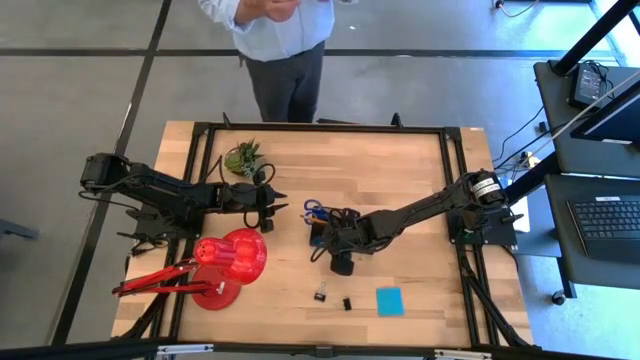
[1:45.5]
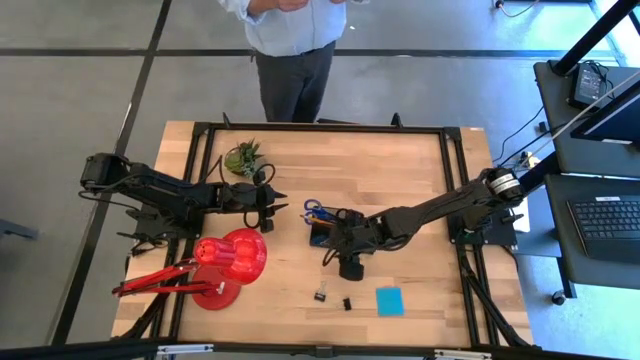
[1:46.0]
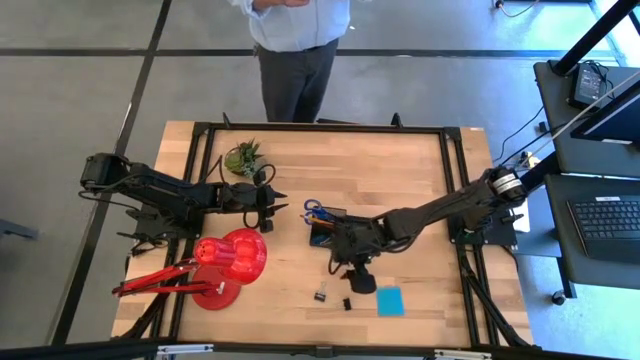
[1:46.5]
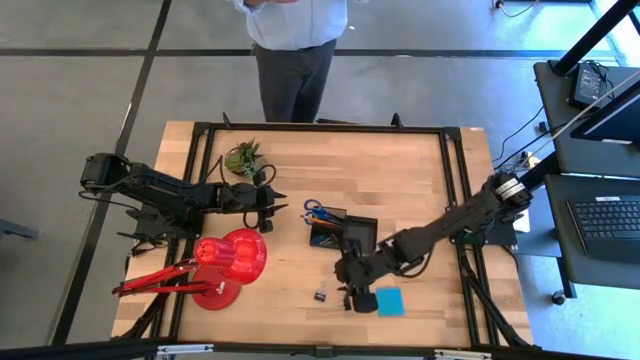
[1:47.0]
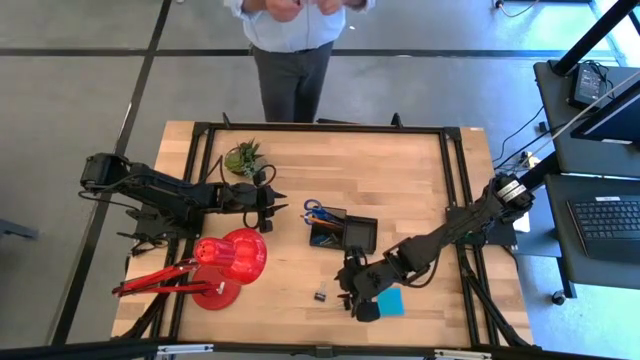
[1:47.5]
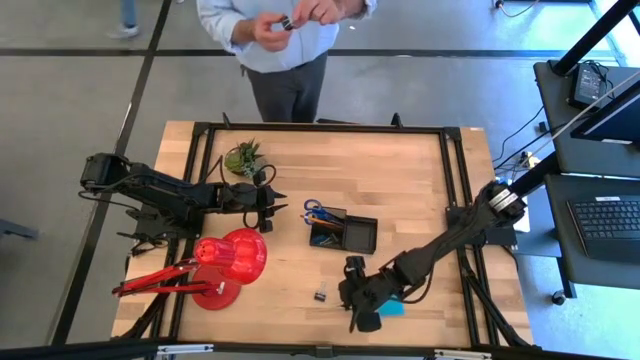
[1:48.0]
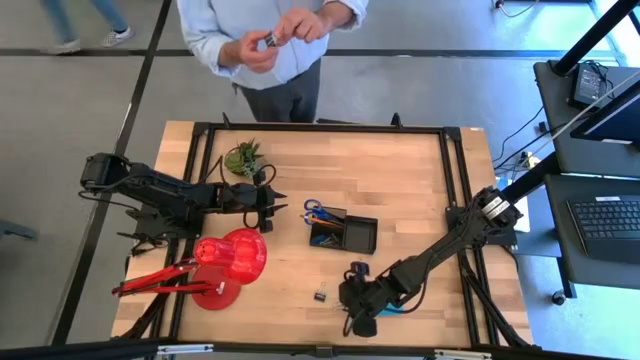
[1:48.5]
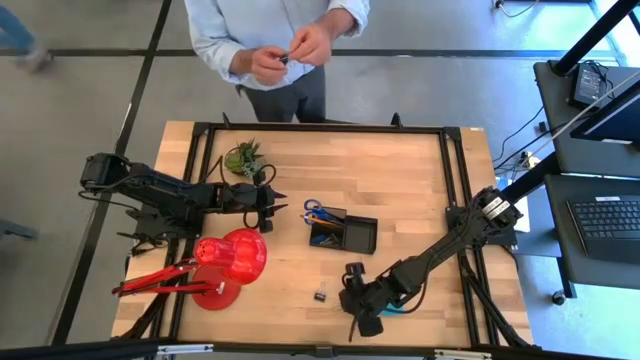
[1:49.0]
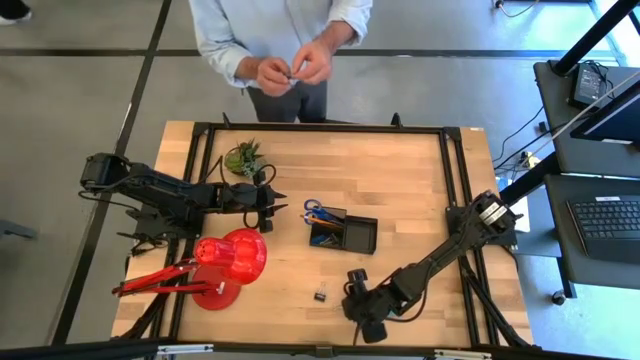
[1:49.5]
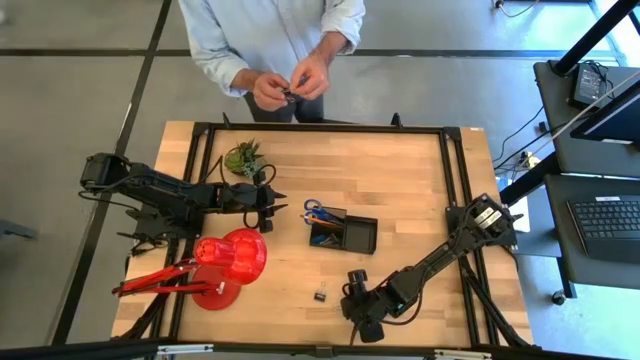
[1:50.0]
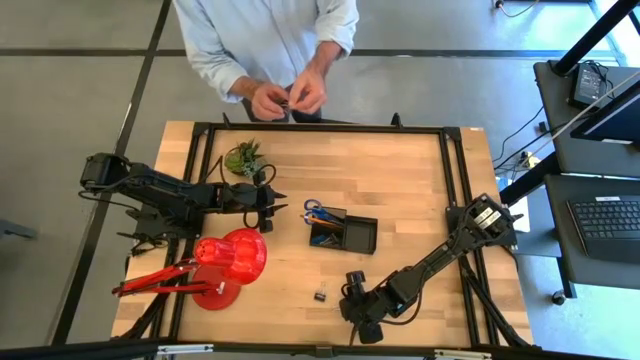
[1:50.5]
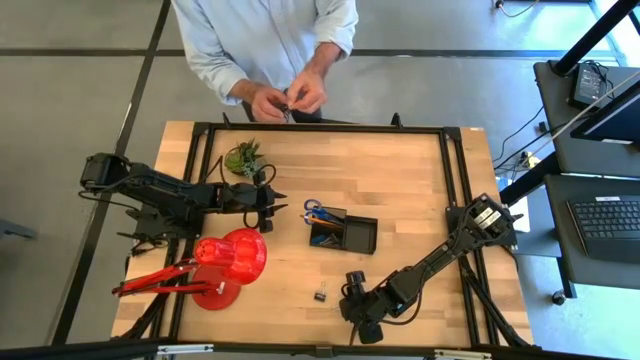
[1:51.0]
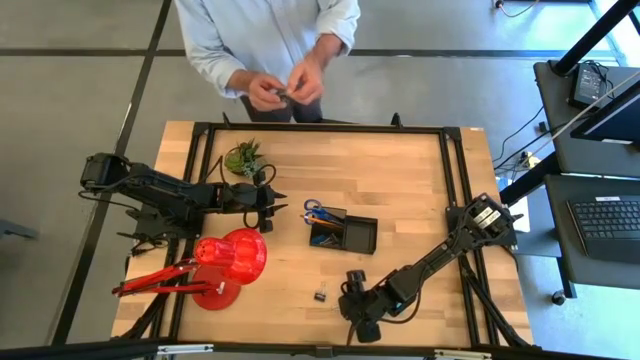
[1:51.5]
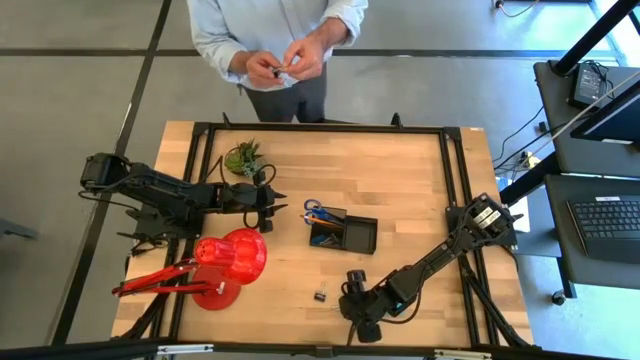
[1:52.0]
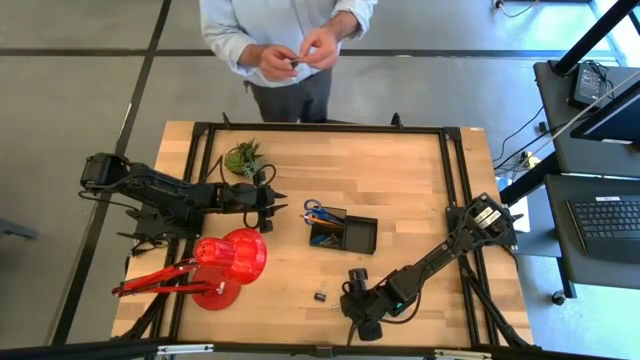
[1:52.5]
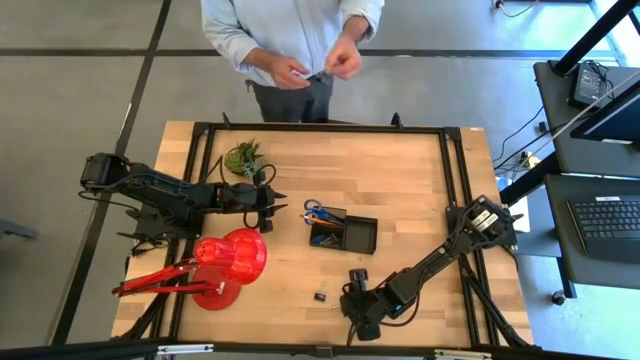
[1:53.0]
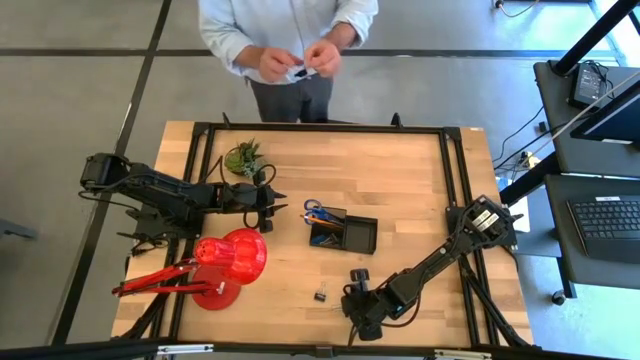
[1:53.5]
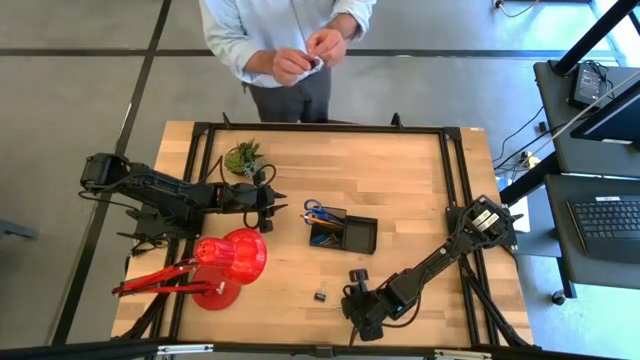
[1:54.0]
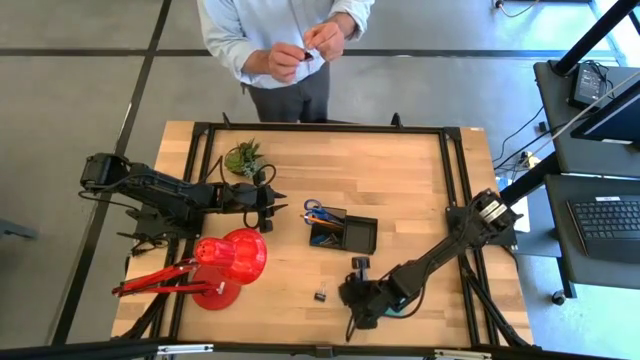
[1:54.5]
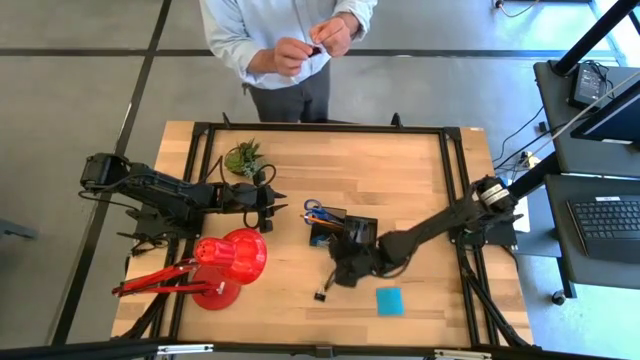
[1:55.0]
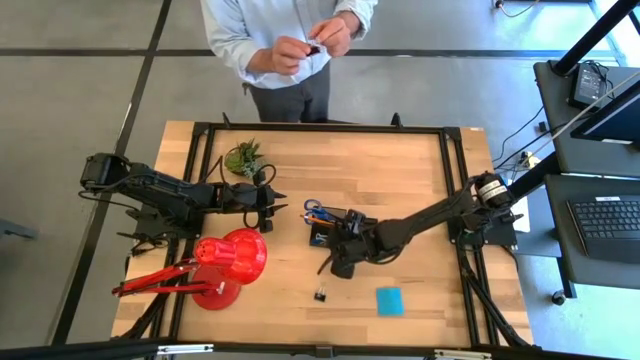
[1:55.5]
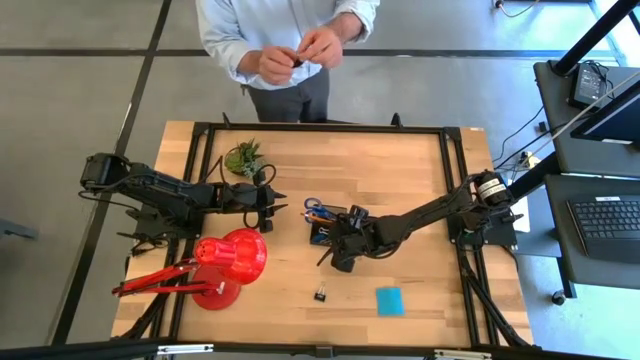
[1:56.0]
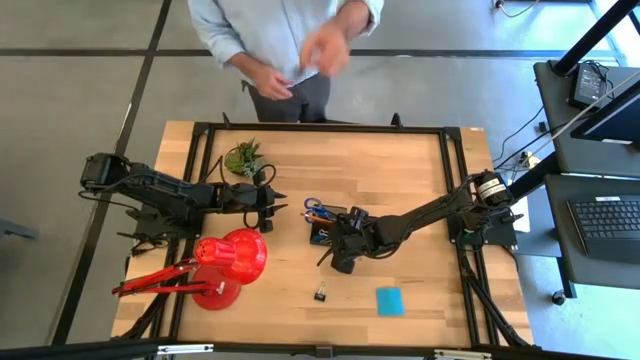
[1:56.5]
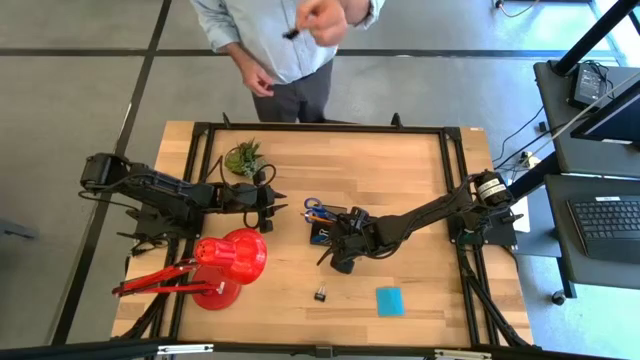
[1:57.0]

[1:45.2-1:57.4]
Task: Pick and place office supplies into organizer
Put the right black binder clip into the black desk organizer

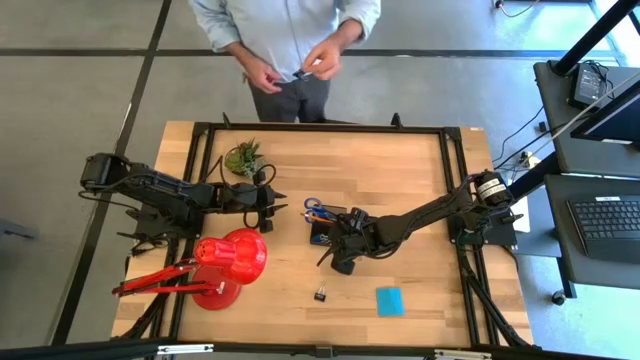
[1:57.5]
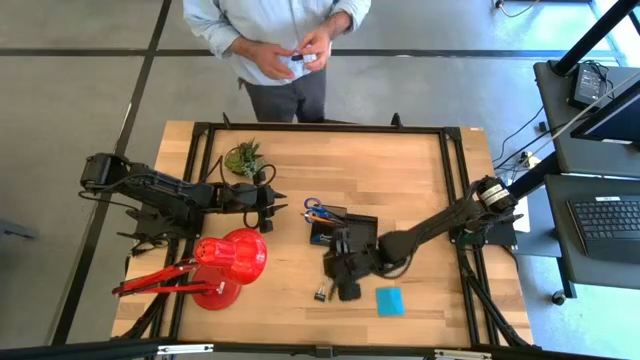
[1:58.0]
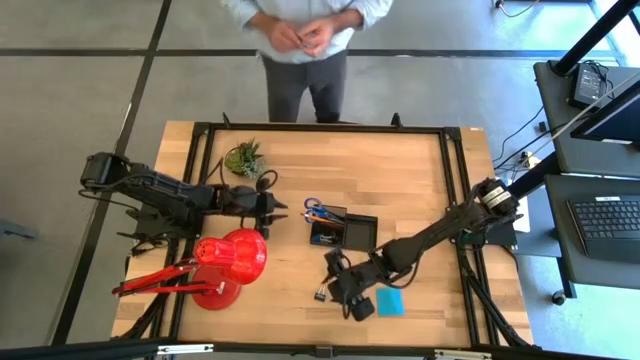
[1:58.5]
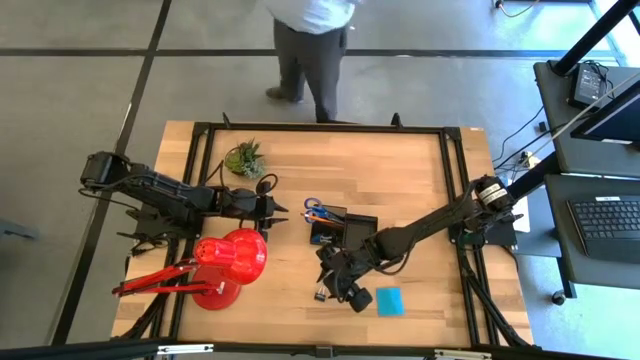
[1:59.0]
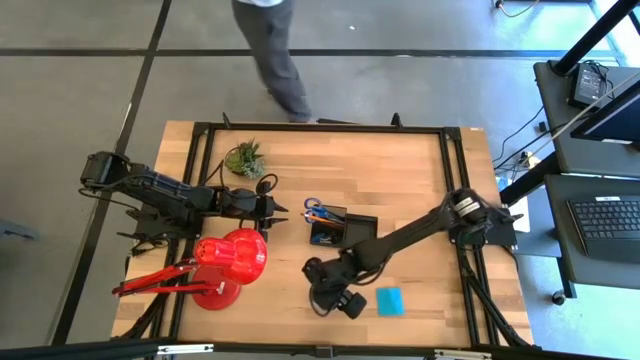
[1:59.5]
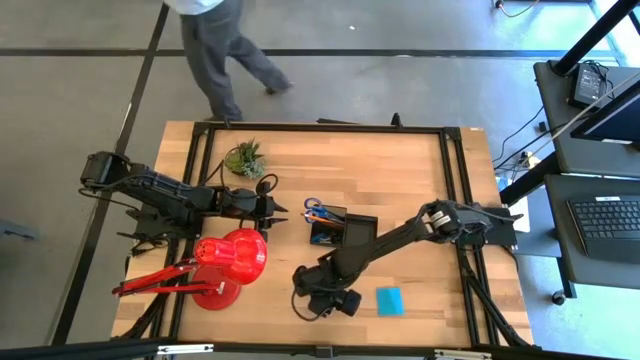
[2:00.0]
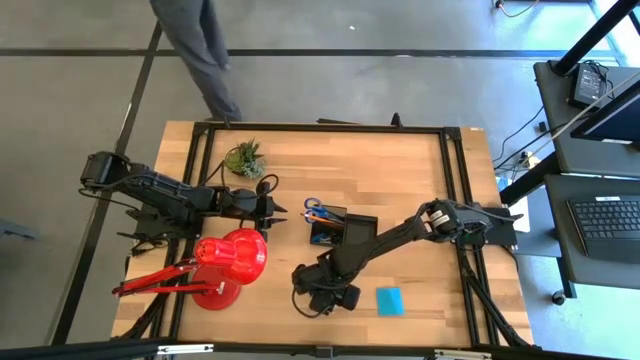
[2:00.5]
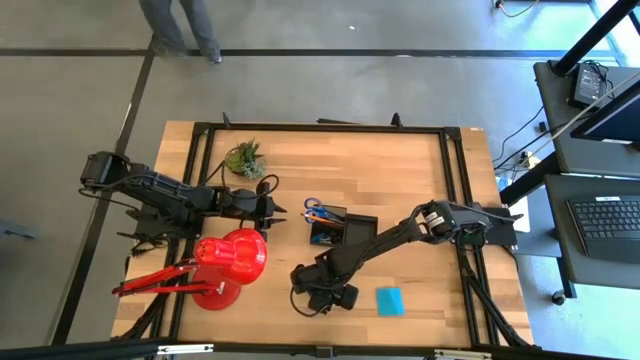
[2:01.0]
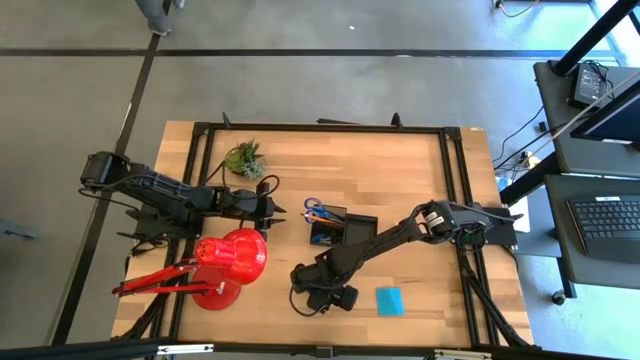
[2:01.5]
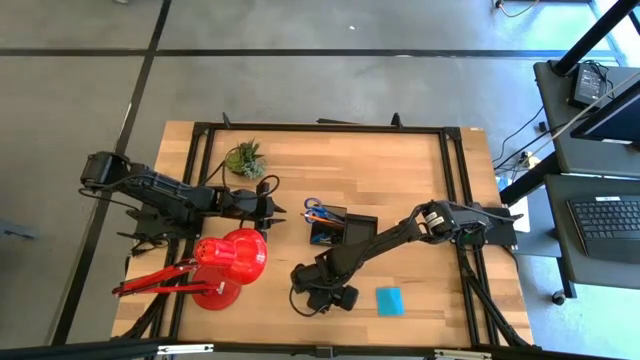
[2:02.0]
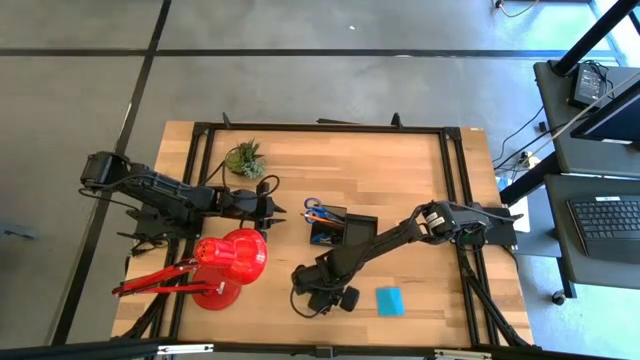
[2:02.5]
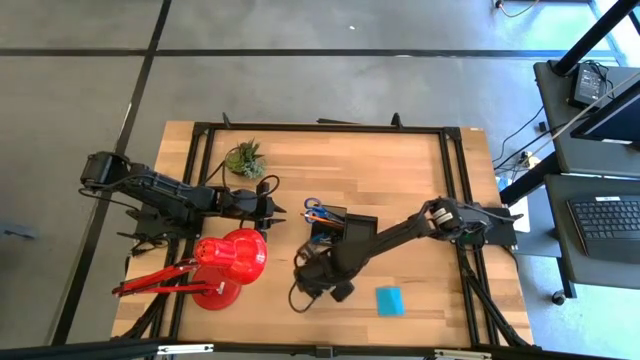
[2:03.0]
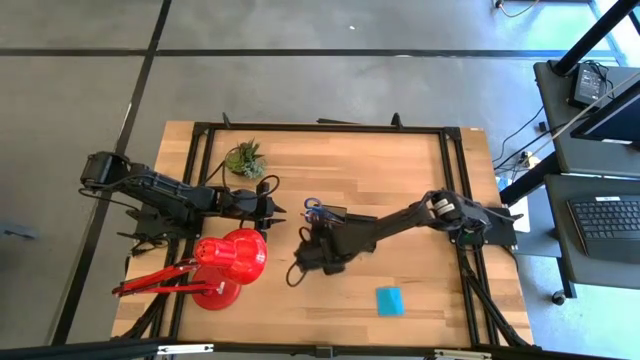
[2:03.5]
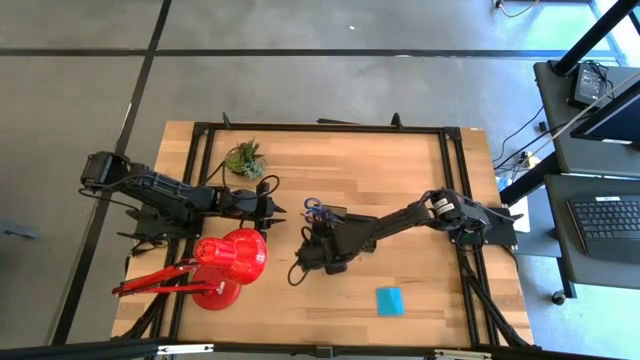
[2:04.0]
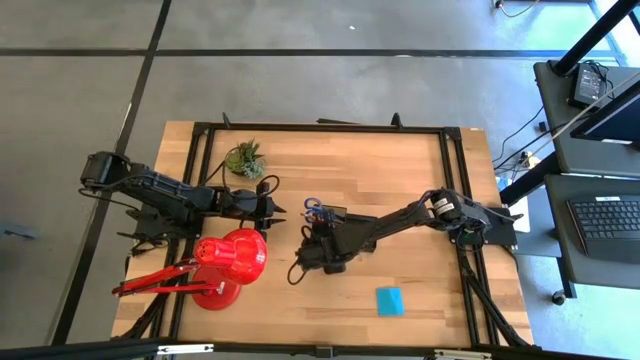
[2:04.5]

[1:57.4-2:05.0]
Put the black binder clip into the black desk organizer

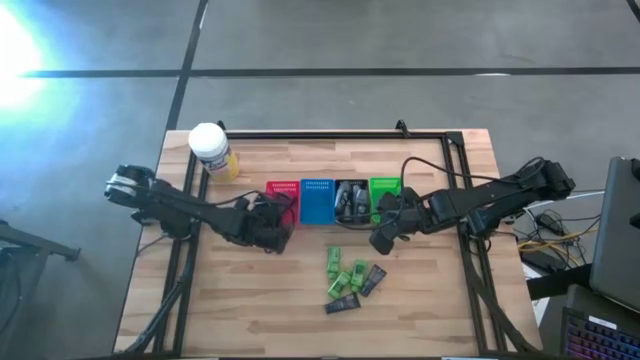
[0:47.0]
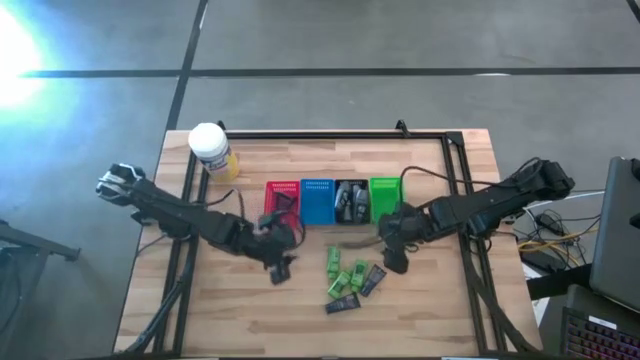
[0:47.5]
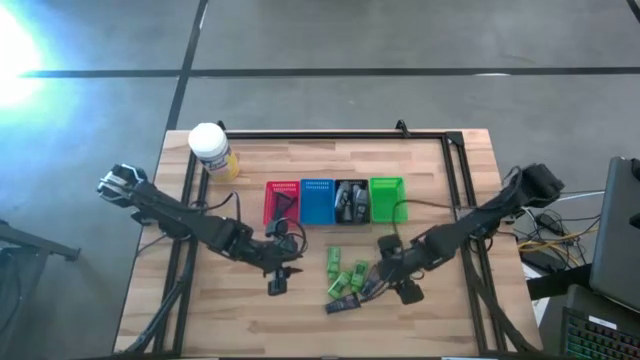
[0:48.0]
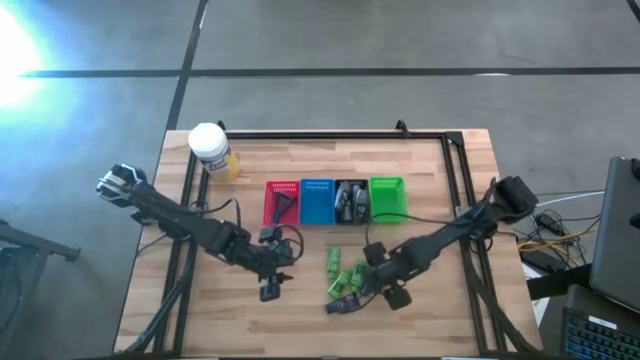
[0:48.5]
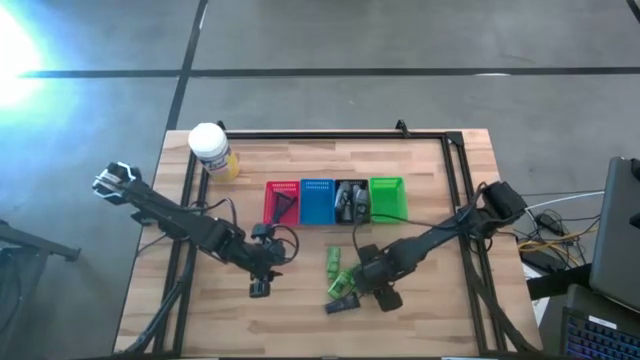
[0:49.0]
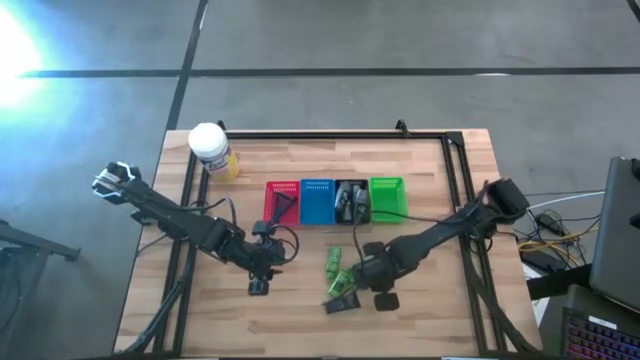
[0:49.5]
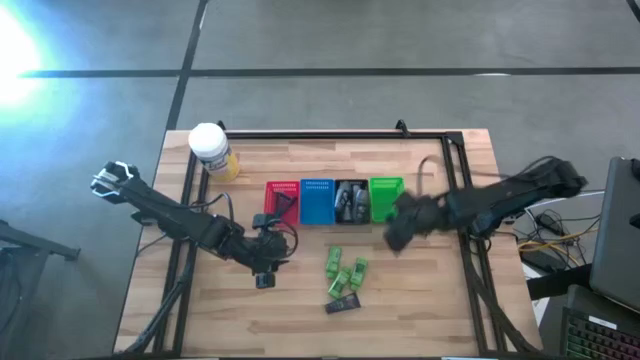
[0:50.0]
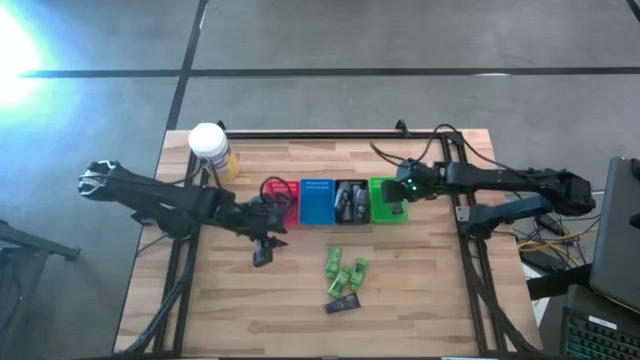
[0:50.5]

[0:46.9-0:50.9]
Task: Pick & Place Travel size toiletries
Put the blue shave cream into the green bin
